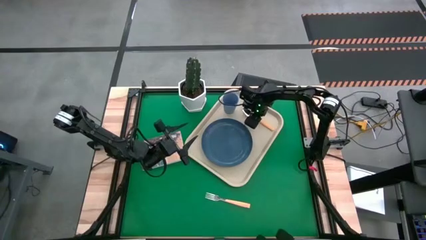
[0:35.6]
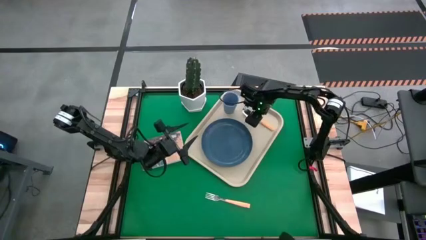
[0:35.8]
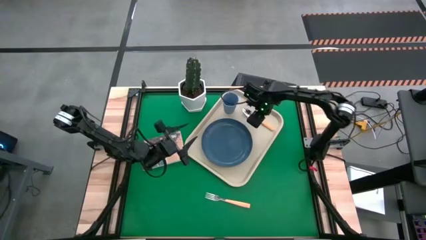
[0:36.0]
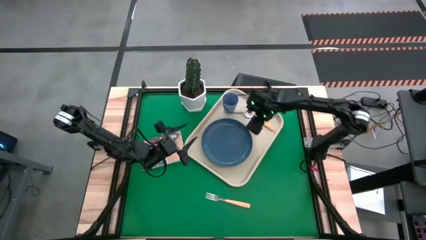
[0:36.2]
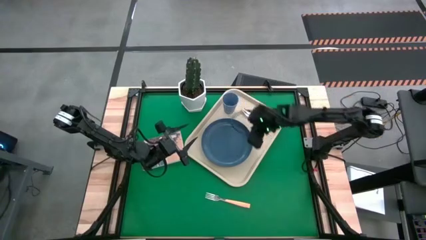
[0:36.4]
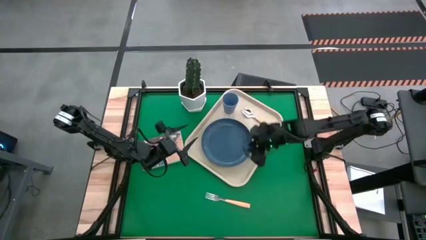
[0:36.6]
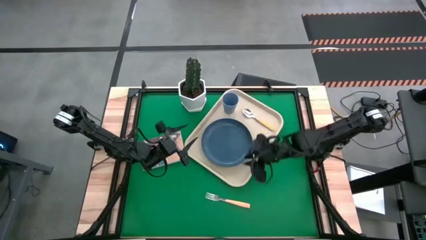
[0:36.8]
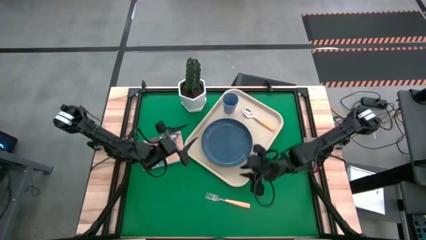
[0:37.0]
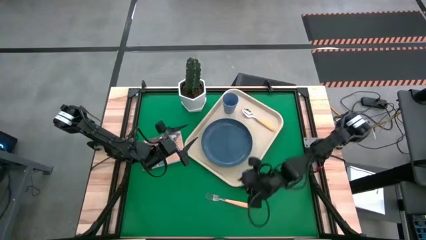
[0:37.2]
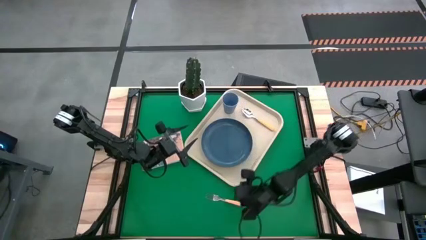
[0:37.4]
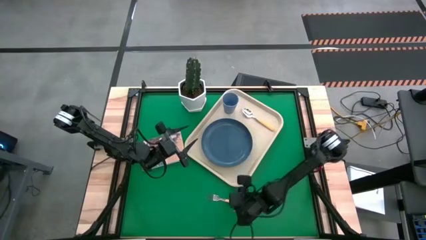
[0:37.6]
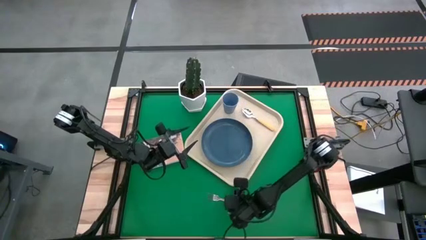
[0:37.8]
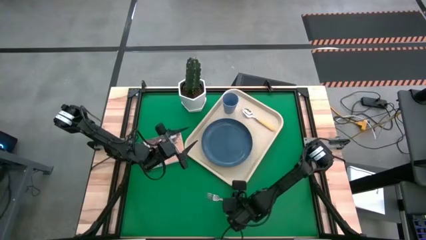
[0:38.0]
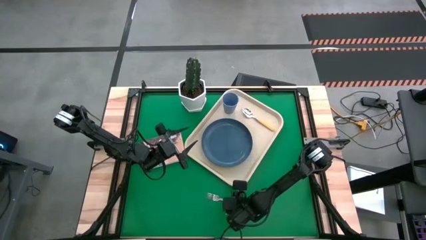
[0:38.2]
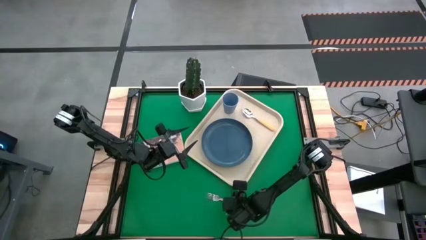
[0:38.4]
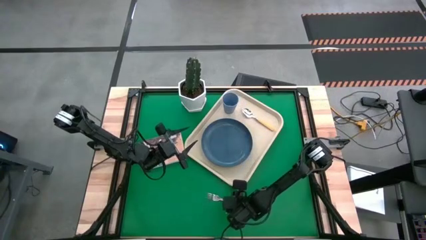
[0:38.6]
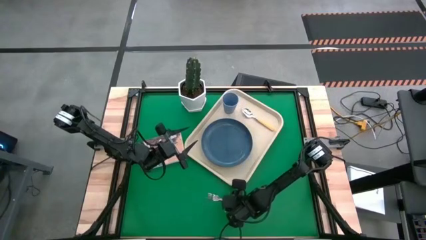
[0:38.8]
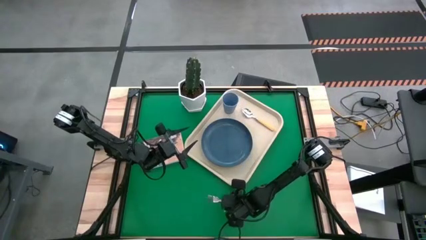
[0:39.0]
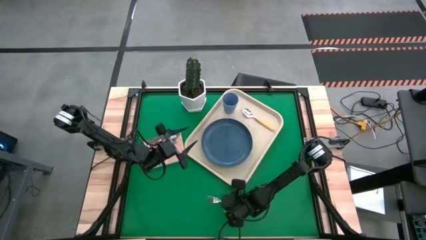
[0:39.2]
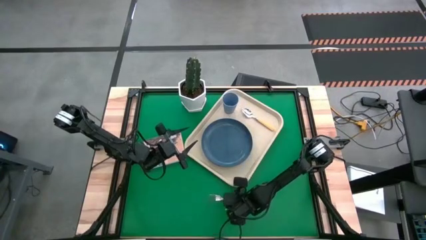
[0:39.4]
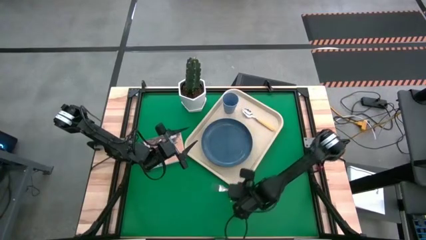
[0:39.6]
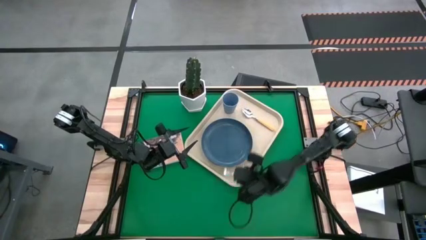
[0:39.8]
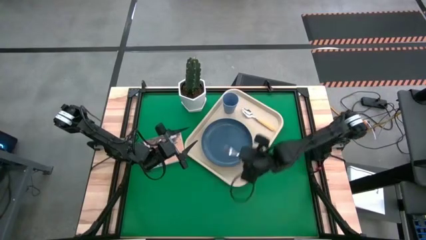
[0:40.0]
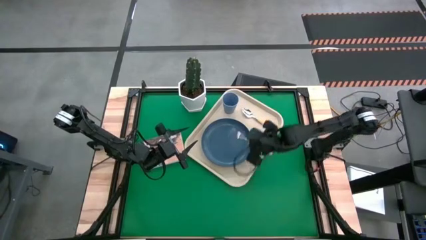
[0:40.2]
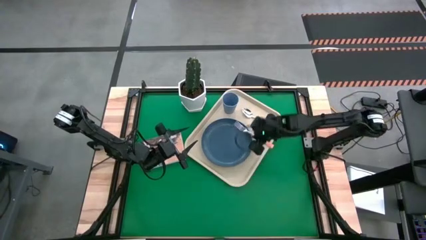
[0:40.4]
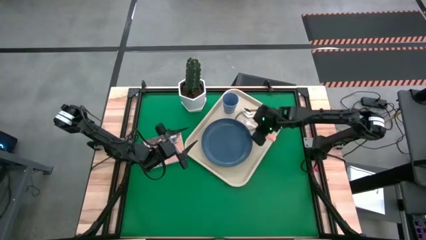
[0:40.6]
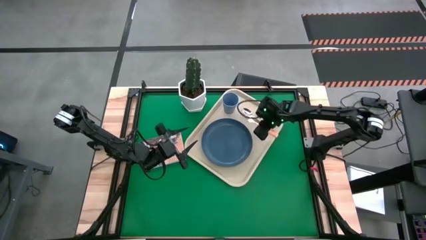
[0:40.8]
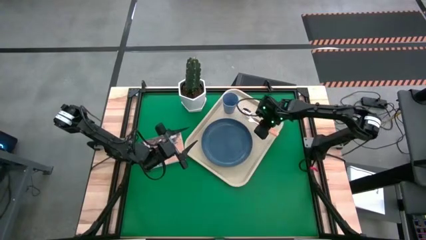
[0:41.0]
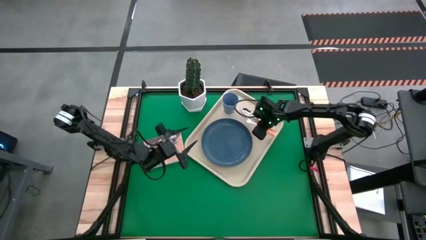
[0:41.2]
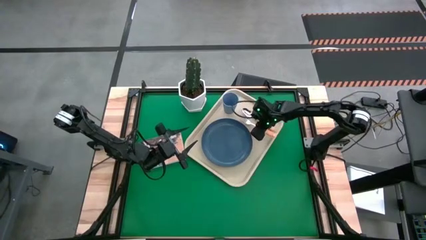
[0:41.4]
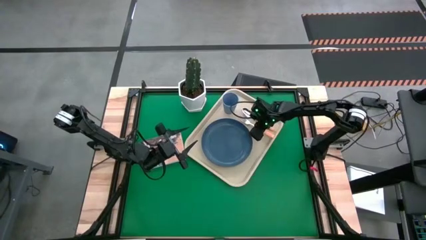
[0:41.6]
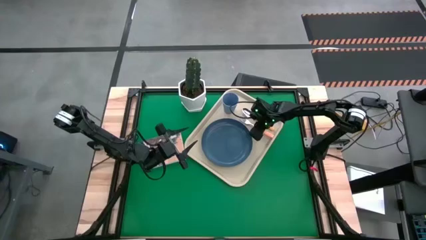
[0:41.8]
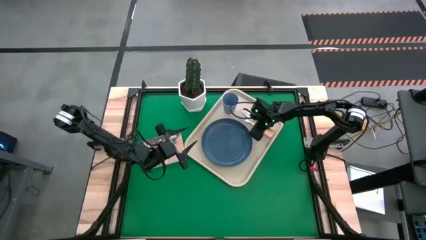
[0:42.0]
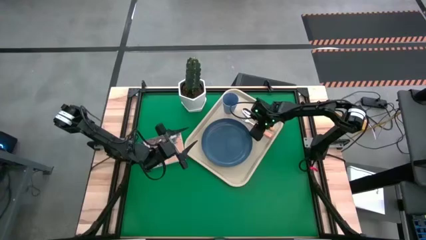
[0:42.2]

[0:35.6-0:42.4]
Task: Pick and place plate/cup/fork/spoon on tray
Put the orange fork beside the dark blue plate on the white tray

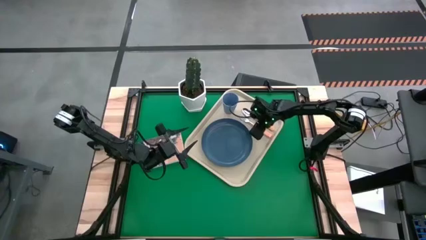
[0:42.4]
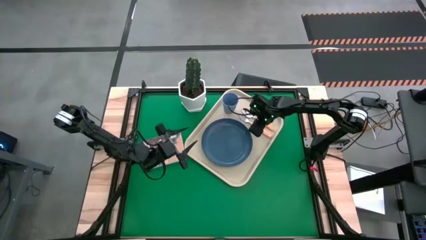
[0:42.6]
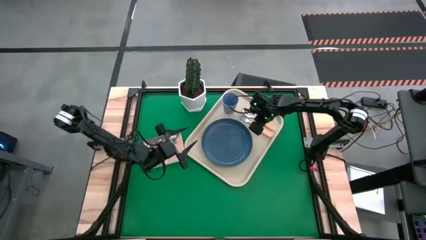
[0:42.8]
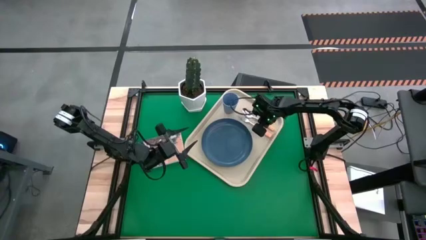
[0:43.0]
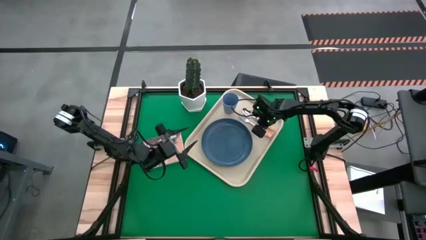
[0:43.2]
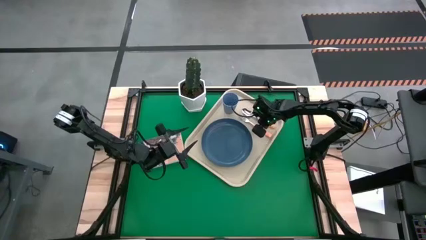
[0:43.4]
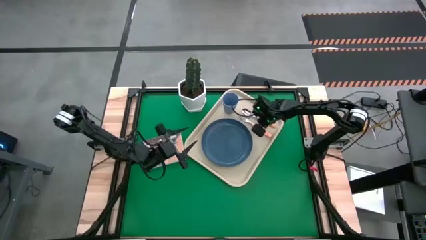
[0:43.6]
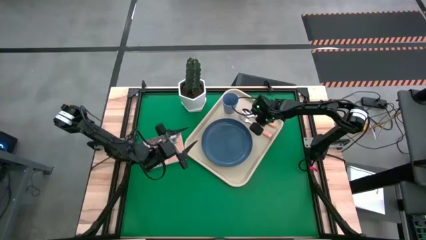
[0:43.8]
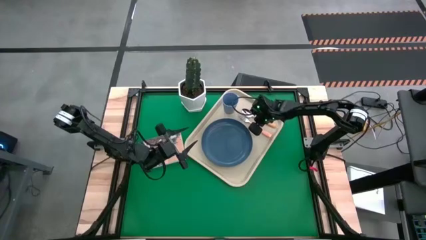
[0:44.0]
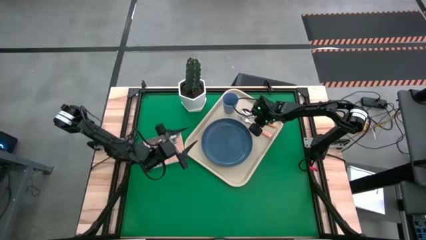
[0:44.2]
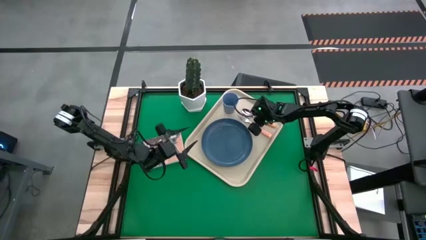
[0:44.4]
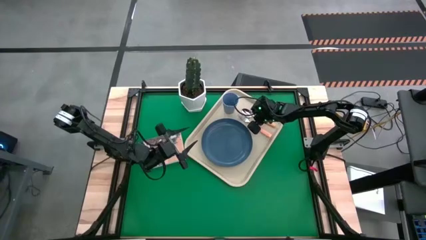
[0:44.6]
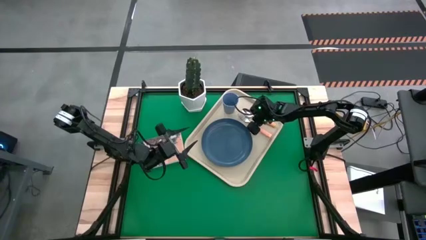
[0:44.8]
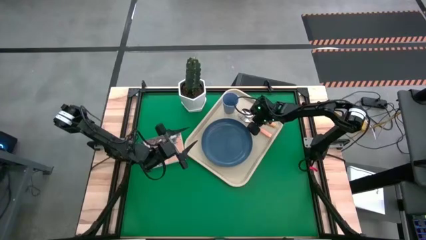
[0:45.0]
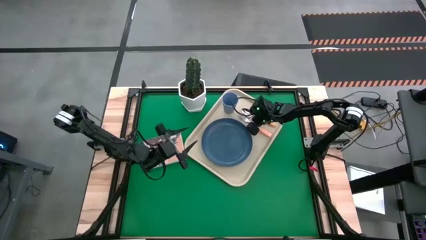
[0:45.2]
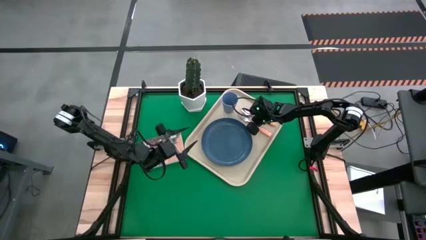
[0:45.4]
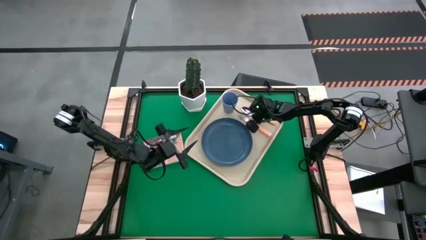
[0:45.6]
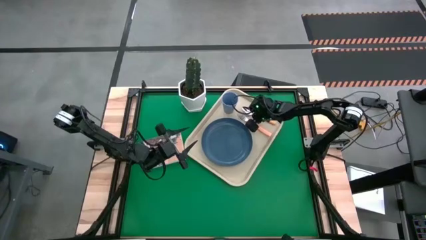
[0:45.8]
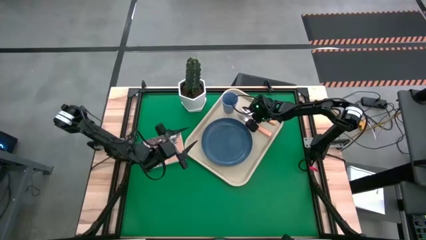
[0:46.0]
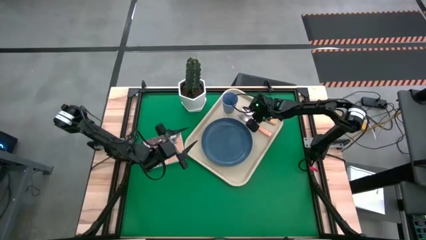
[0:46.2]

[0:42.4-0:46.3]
Adjust the orange spoon on the white tray

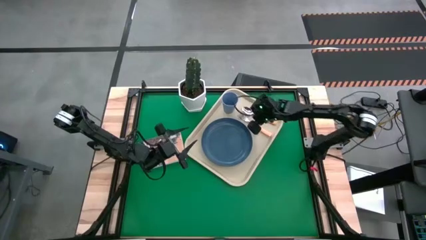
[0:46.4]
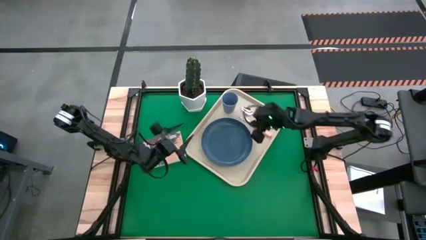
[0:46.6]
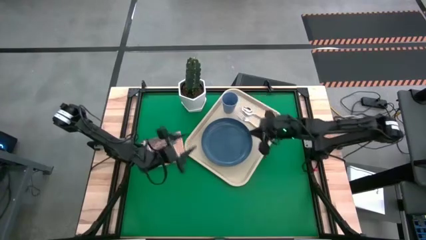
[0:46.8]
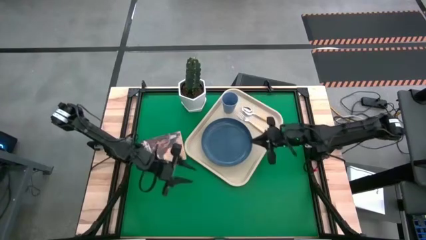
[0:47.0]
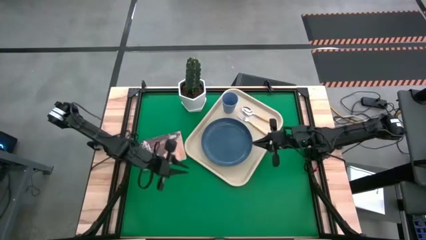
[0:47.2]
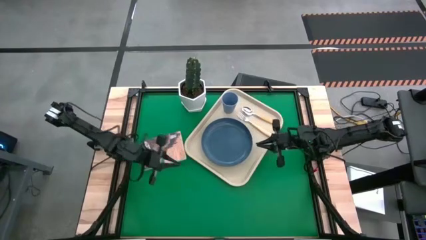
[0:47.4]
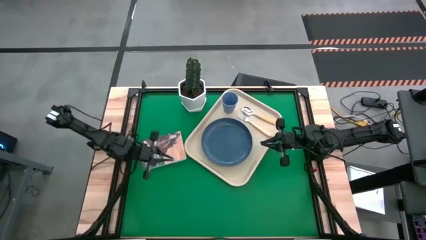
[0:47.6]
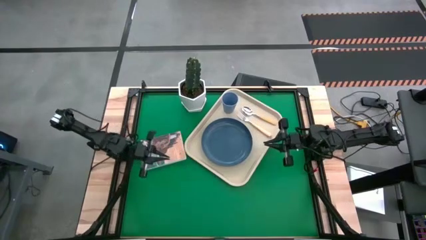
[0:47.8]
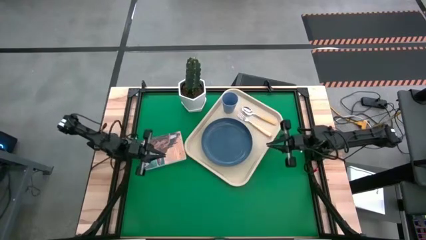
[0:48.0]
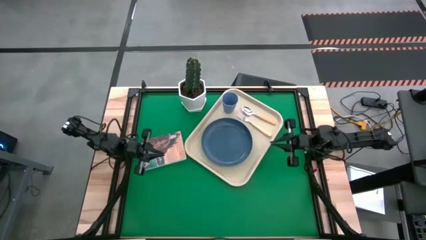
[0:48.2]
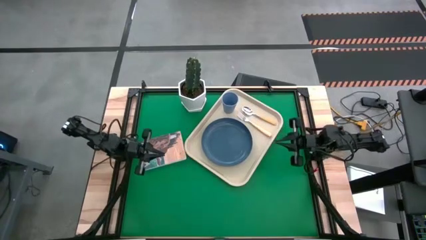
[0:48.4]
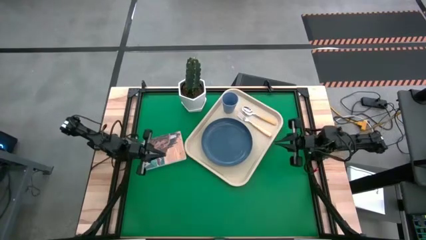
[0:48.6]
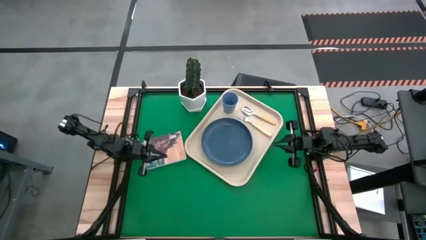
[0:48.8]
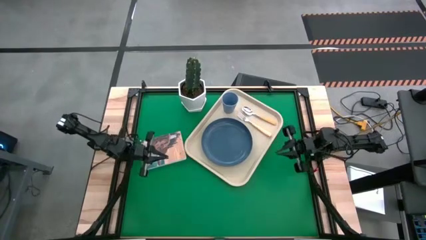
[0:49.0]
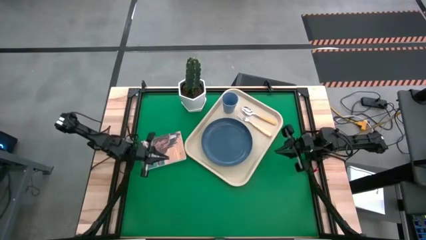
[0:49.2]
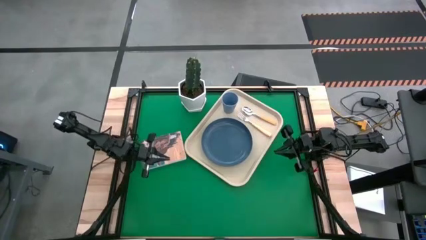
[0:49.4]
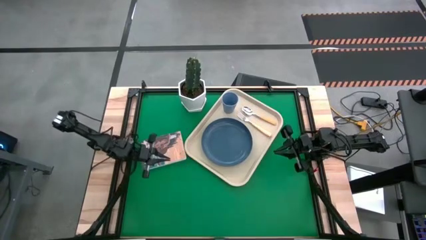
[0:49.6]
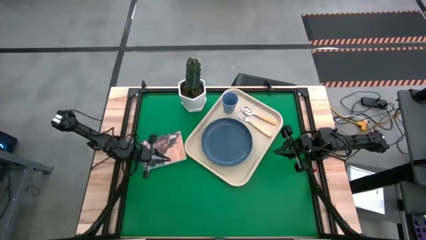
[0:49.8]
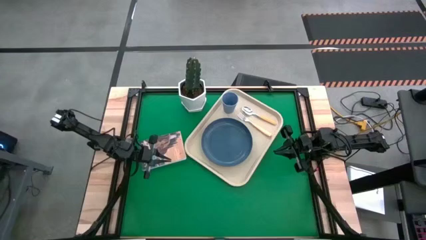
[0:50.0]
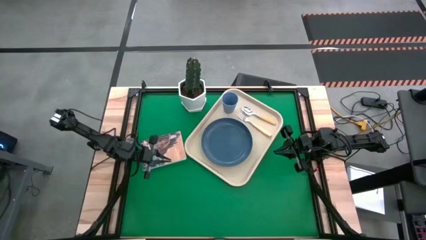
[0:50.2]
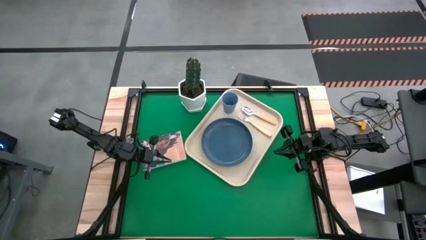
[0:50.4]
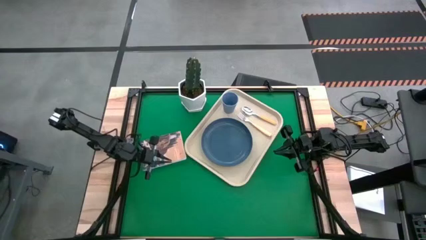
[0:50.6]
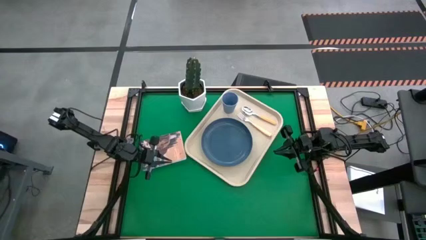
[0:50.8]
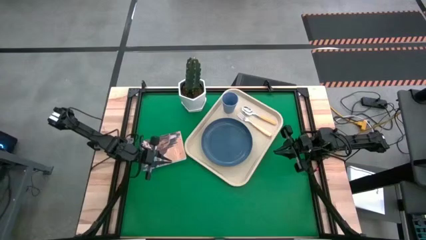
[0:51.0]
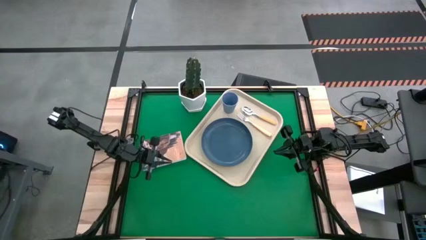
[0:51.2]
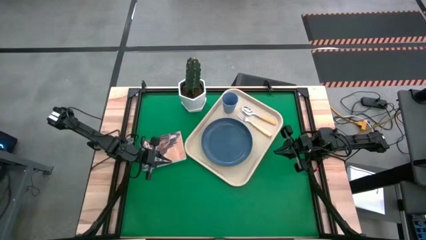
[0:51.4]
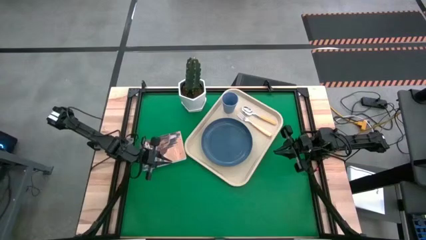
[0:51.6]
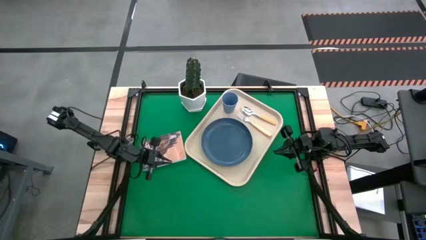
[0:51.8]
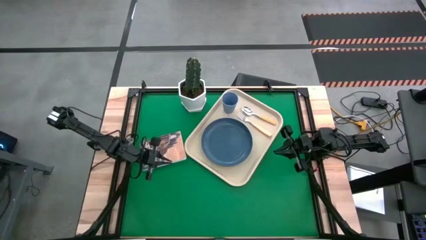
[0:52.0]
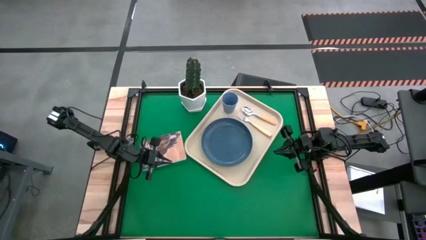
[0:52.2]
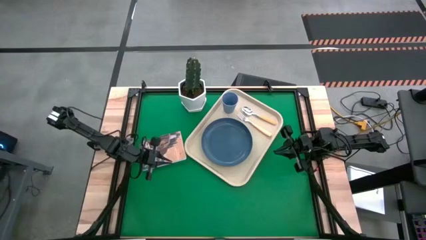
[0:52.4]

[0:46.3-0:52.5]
Return to Home Position
